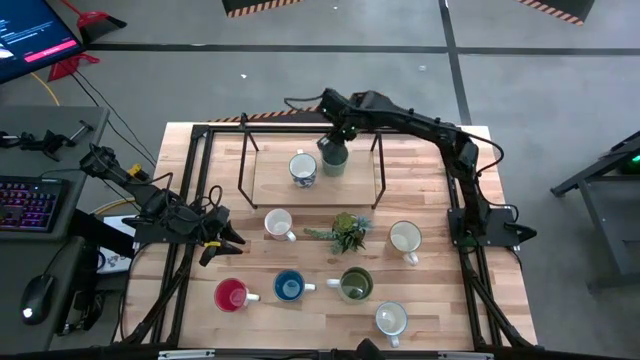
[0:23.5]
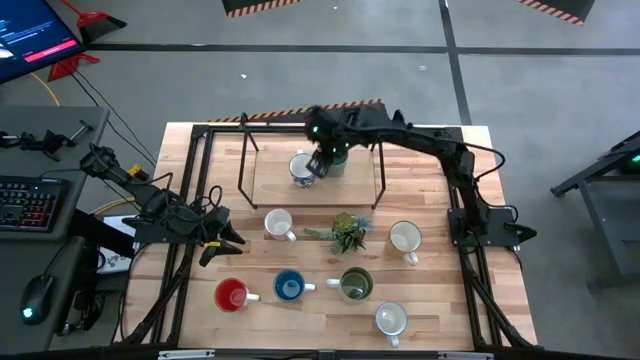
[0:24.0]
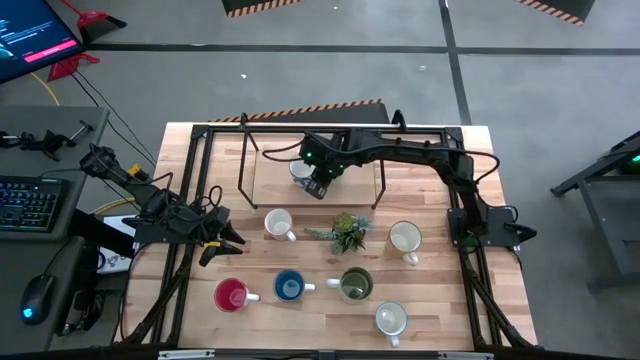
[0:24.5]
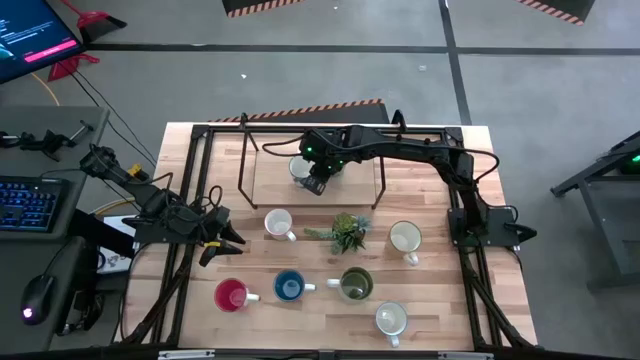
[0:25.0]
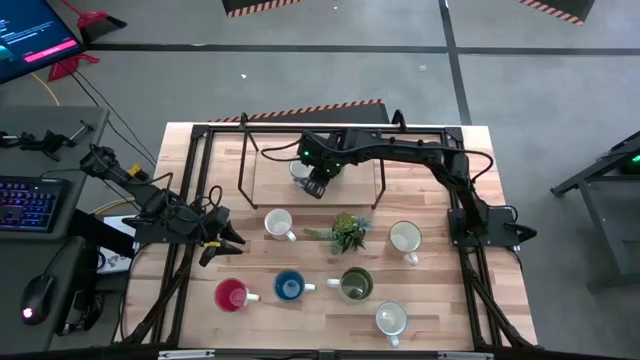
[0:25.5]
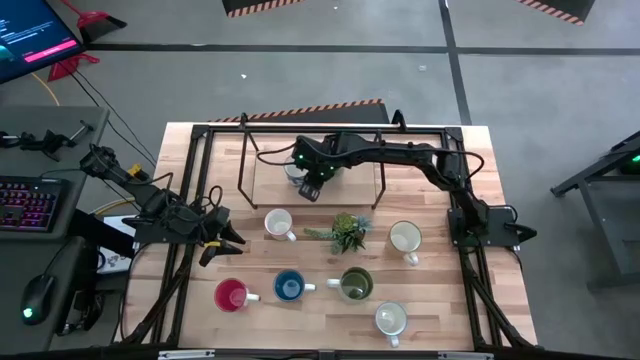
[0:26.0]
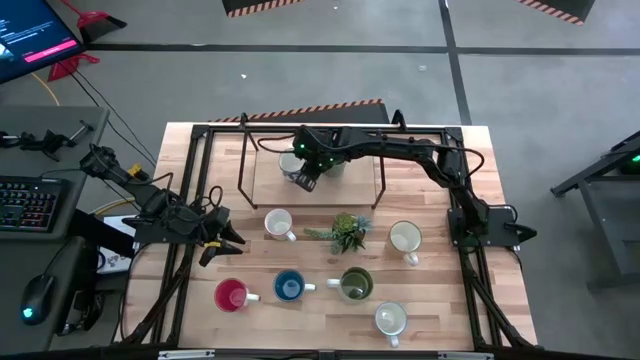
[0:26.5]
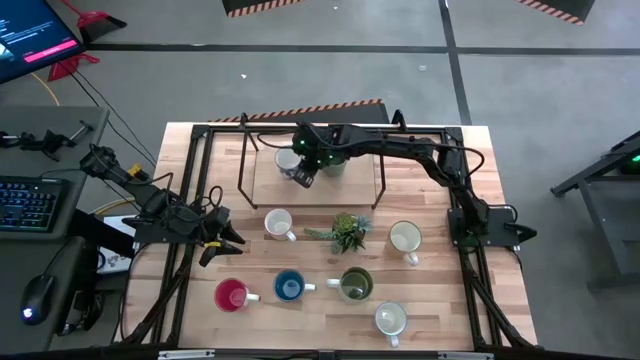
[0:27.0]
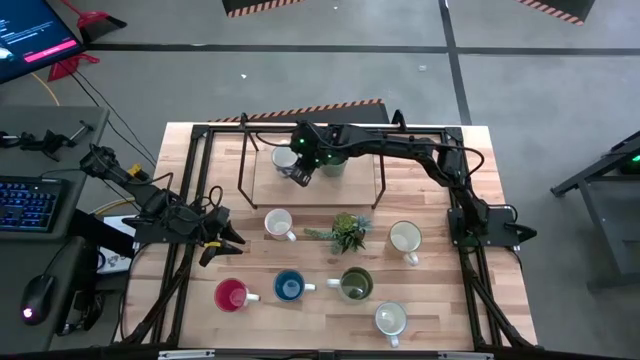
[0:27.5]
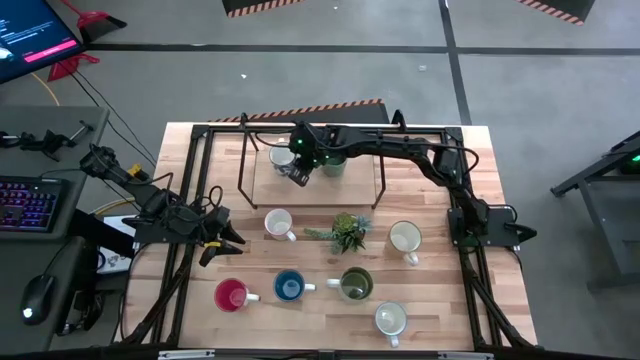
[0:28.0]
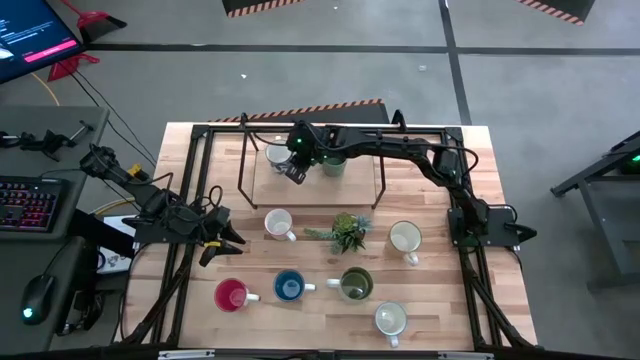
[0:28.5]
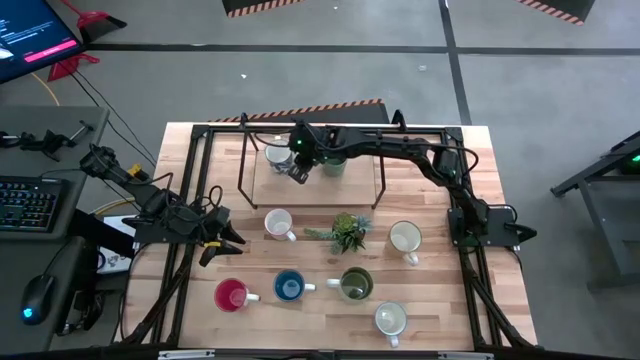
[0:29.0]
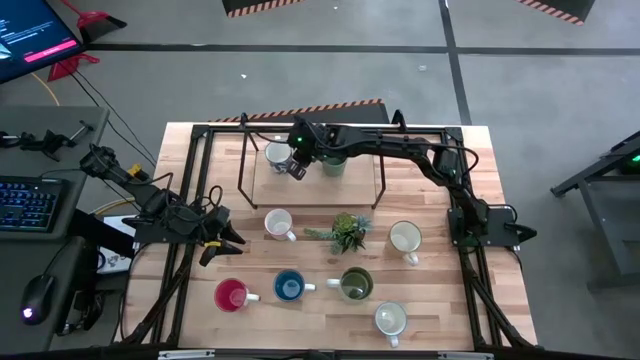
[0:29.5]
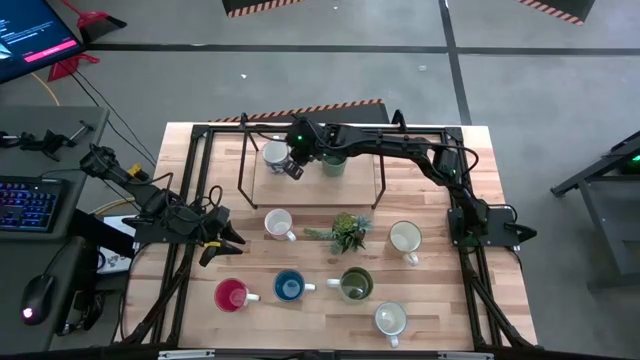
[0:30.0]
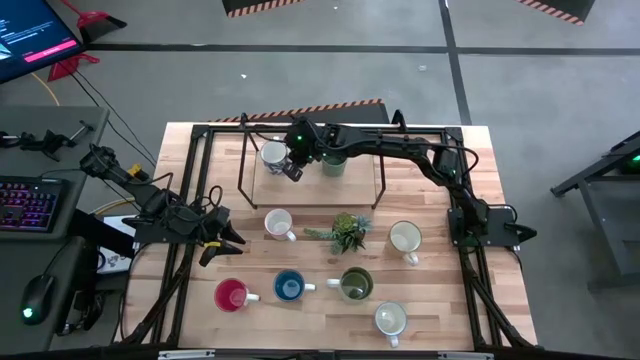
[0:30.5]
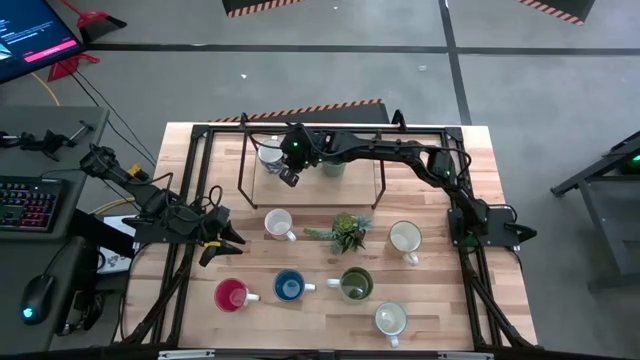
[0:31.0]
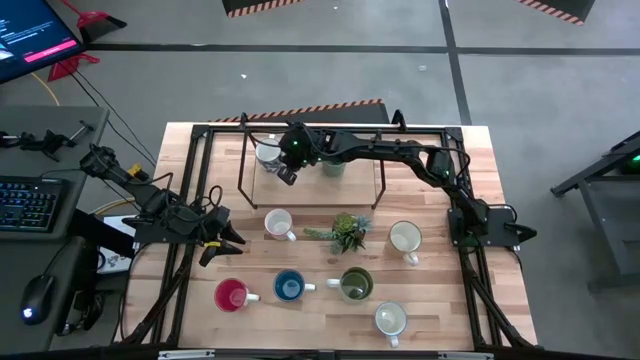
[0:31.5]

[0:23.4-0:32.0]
Task: Place coffee mugs
Adjust the blue patterned mug on the shelf

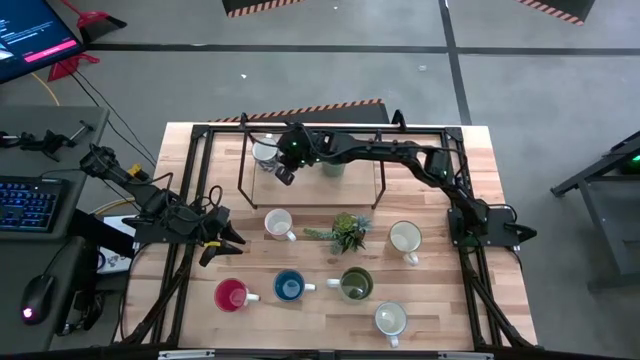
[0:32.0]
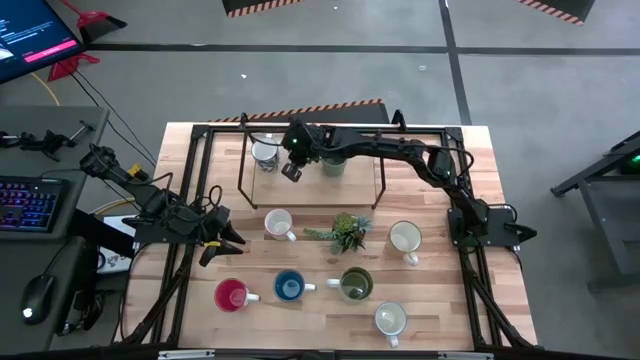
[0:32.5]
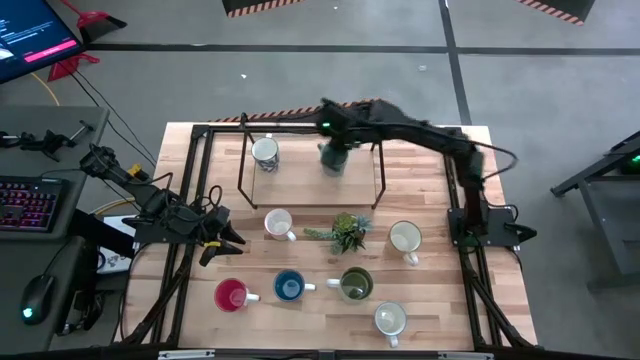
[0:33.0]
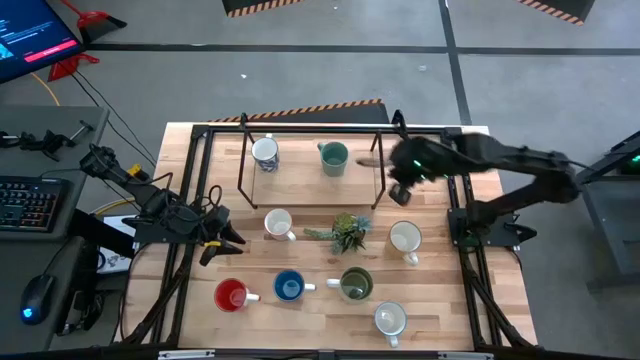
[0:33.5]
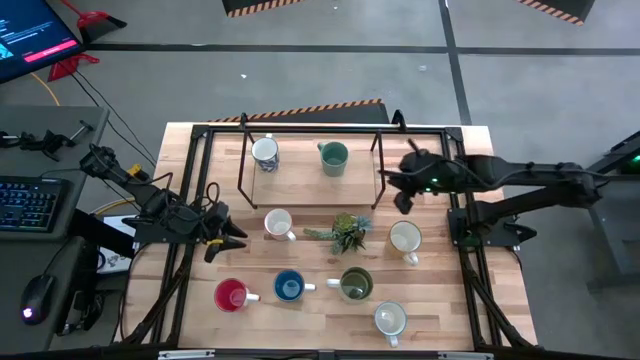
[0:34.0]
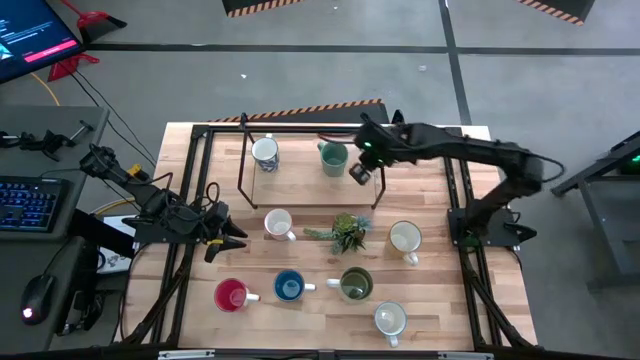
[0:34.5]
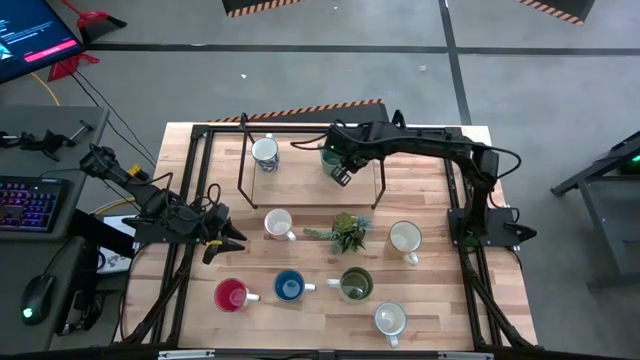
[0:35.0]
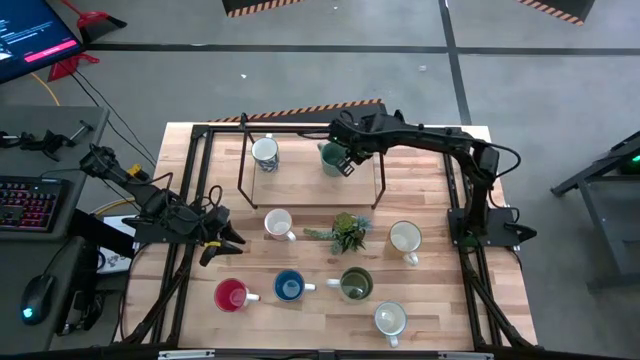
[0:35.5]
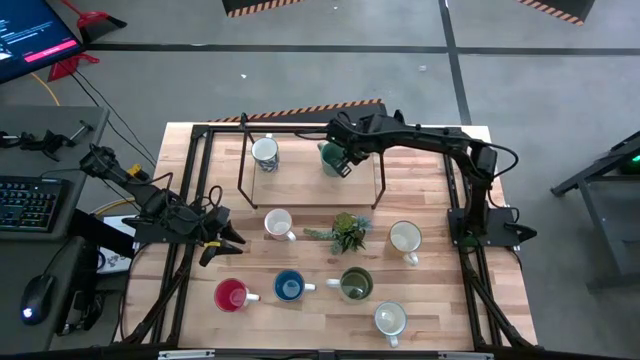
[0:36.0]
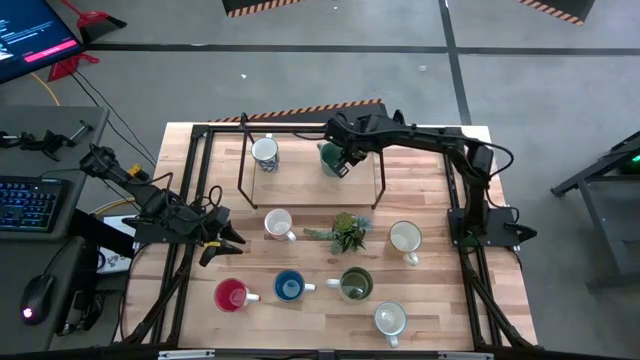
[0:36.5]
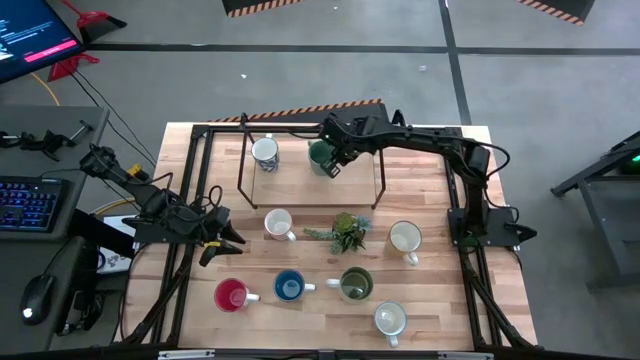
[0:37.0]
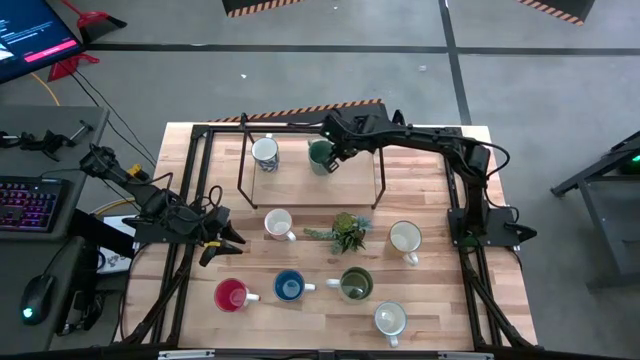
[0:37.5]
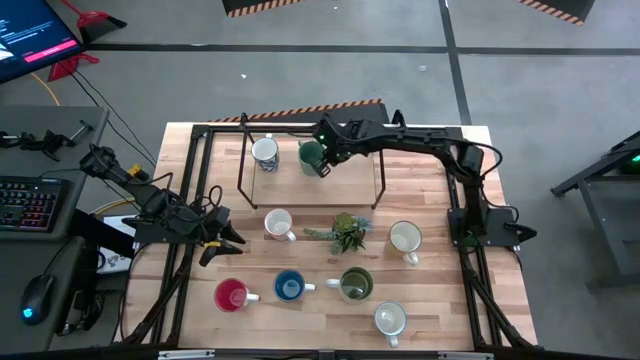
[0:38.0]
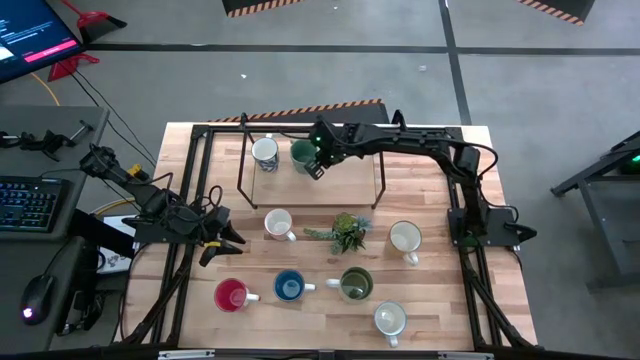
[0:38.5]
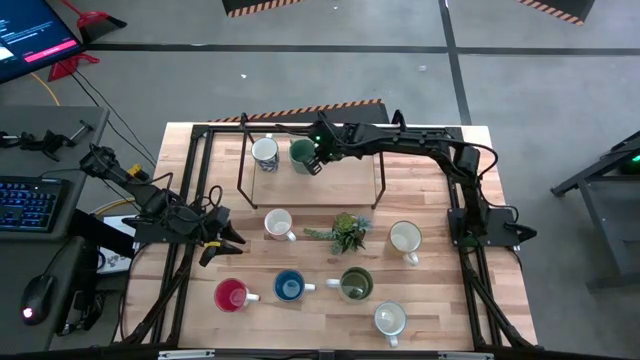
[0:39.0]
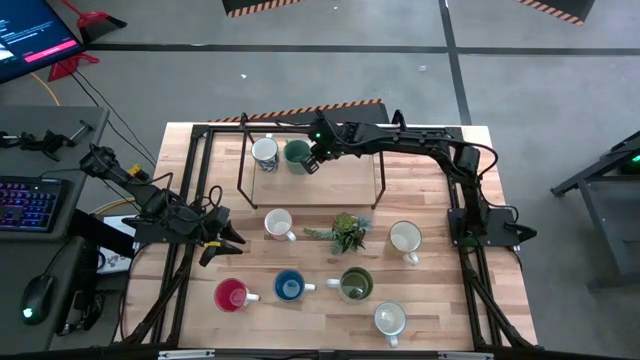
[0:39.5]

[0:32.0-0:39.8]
Adjust the green mug on the shelf

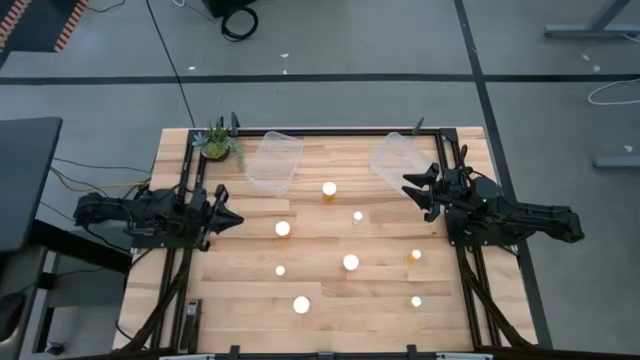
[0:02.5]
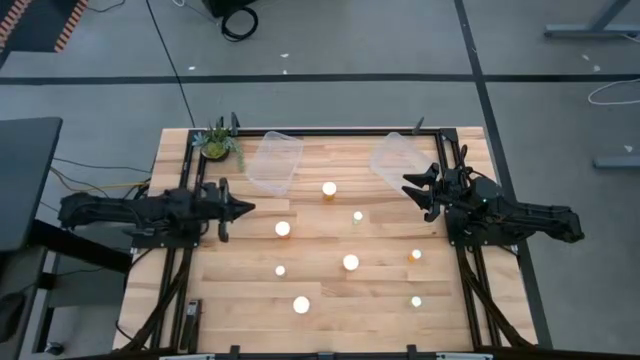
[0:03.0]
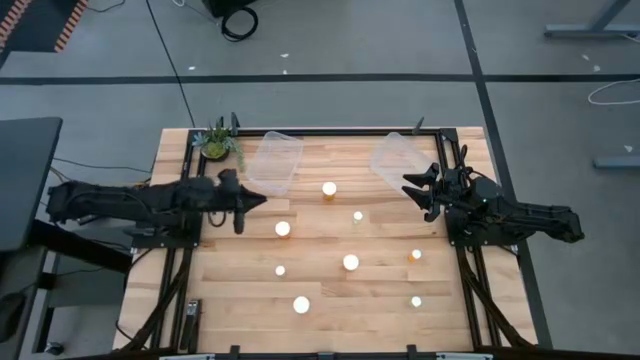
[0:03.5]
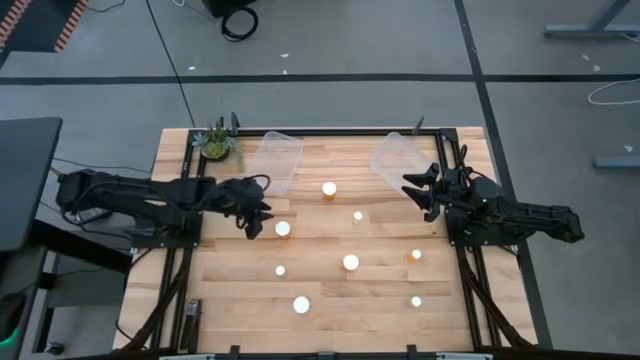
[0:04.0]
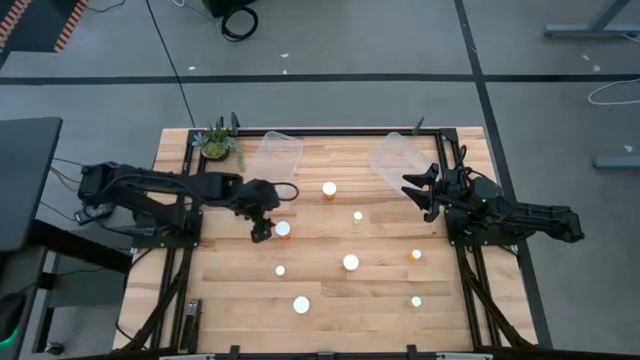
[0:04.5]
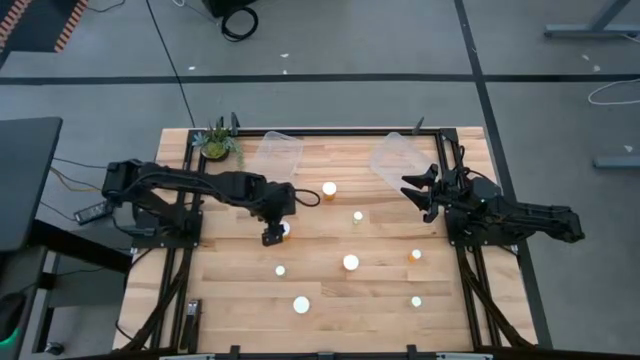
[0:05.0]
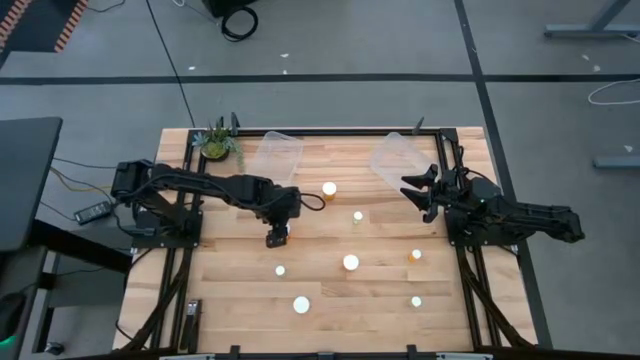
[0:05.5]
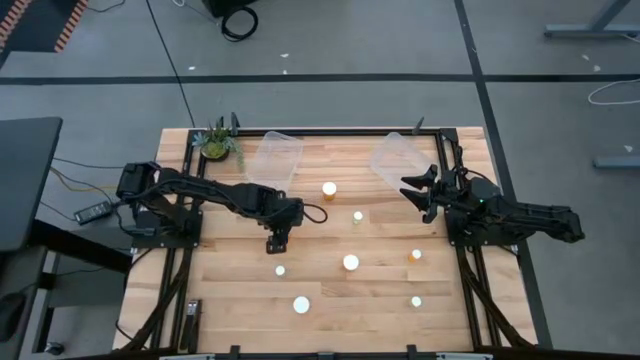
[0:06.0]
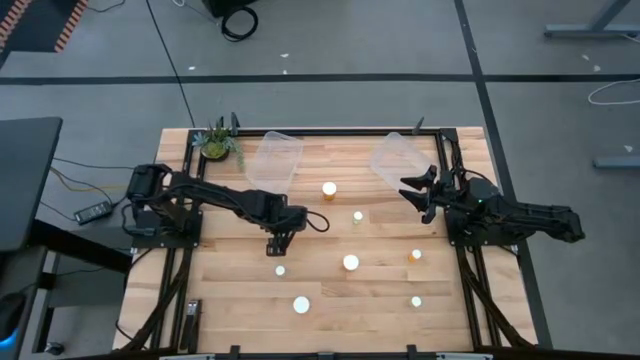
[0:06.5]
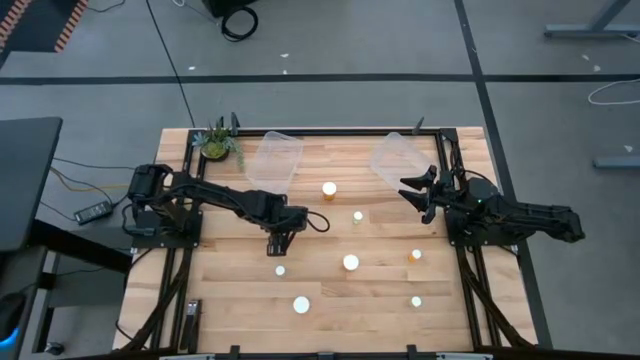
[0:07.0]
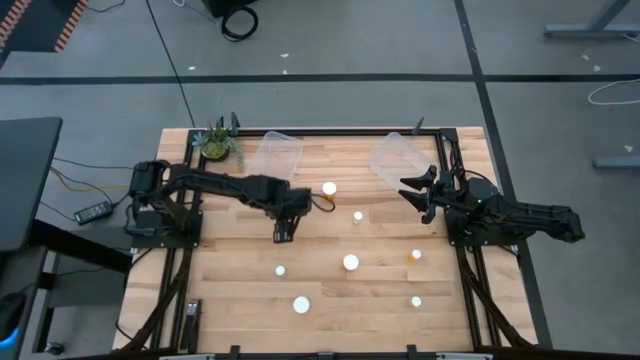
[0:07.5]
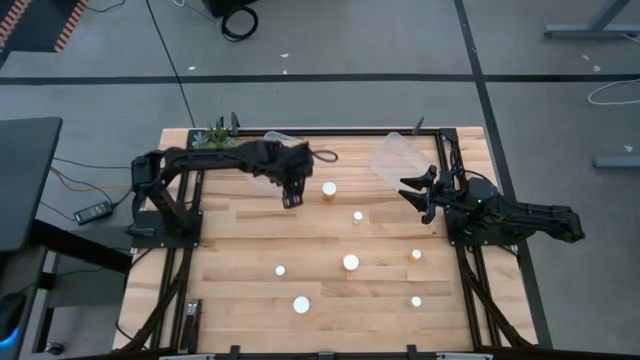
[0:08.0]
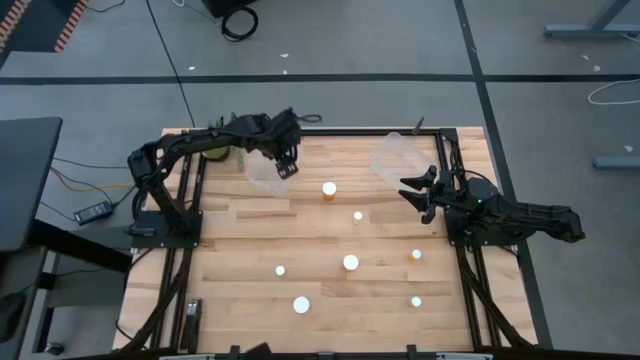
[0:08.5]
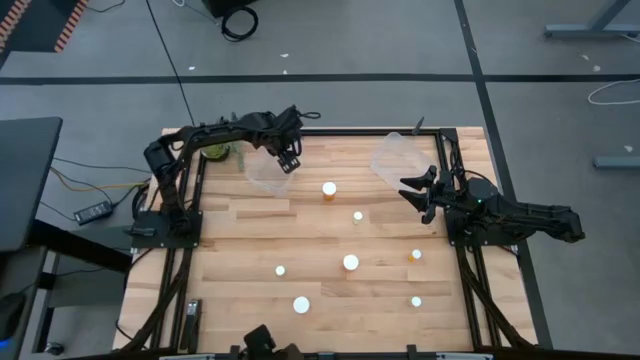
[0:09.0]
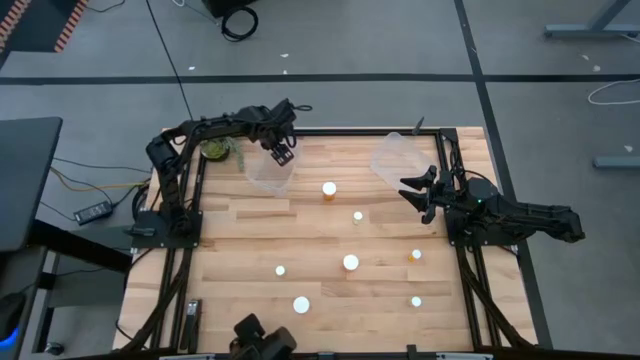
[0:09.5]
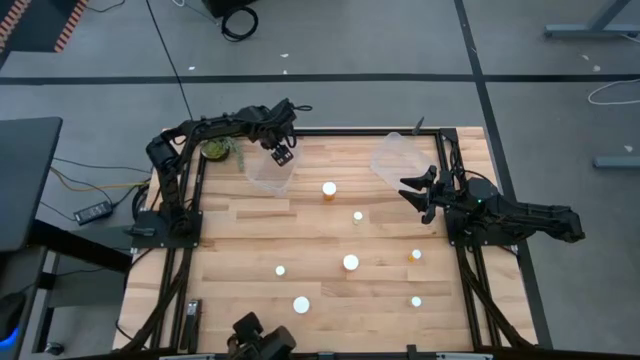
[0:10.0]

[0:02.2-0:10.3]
Task: Pick and place medicine bottles into bin by pill shape (circle, oval)
Put the large orange pill bottle into the left transparent bin
